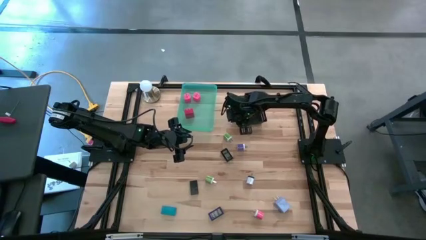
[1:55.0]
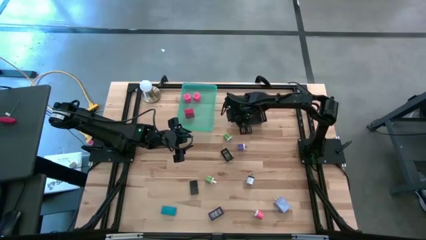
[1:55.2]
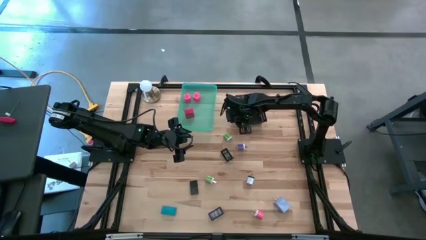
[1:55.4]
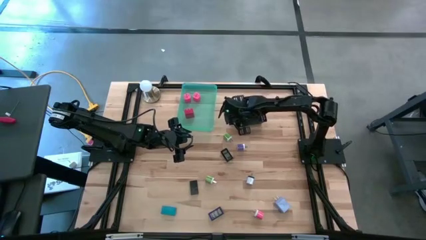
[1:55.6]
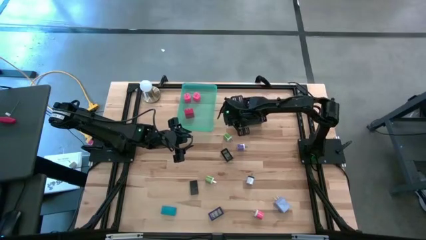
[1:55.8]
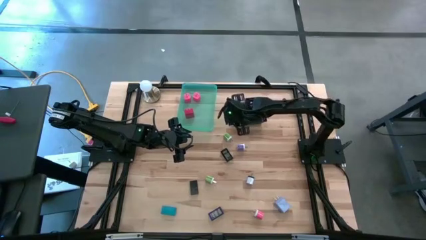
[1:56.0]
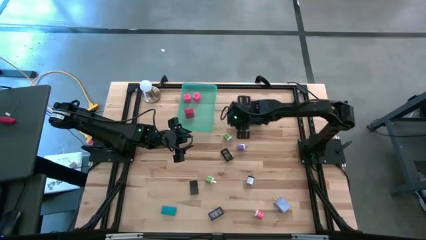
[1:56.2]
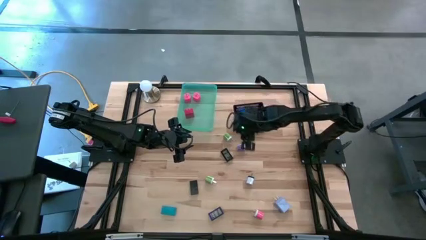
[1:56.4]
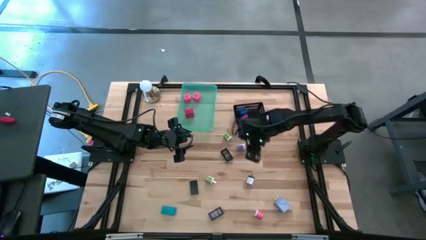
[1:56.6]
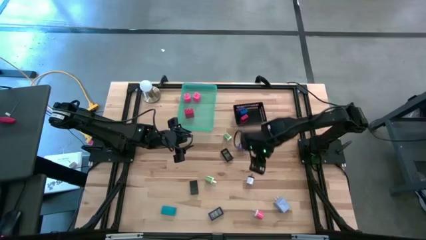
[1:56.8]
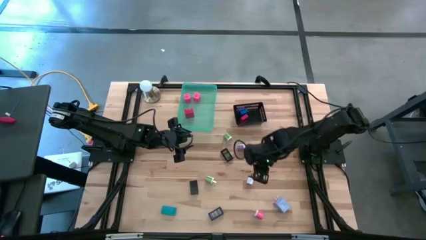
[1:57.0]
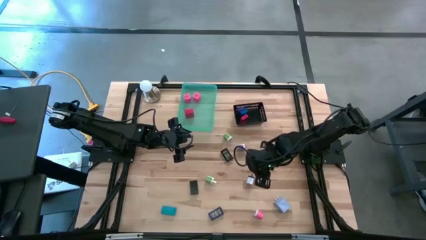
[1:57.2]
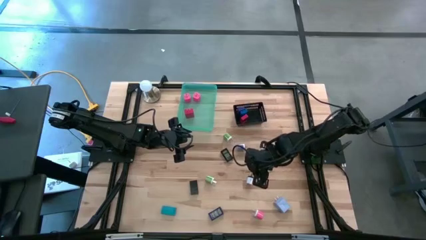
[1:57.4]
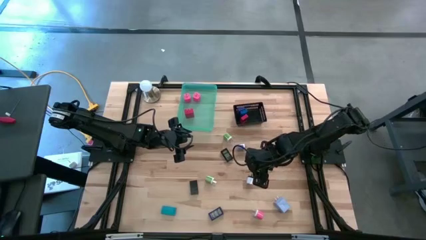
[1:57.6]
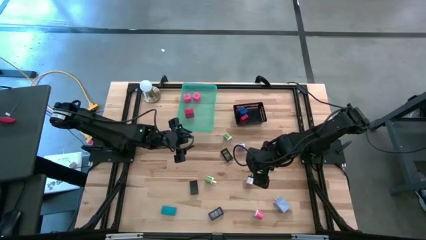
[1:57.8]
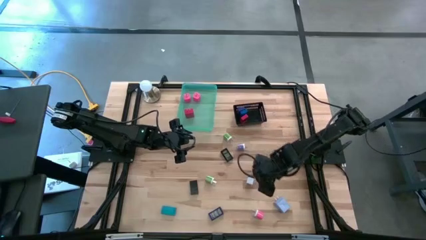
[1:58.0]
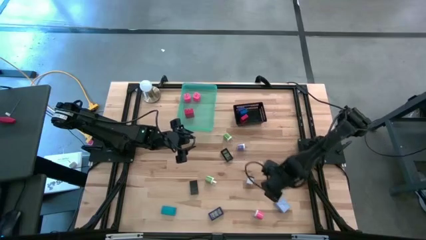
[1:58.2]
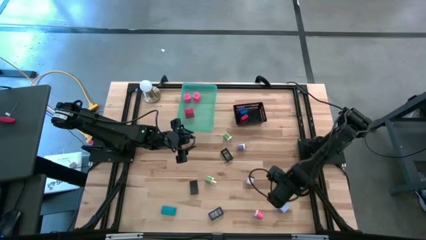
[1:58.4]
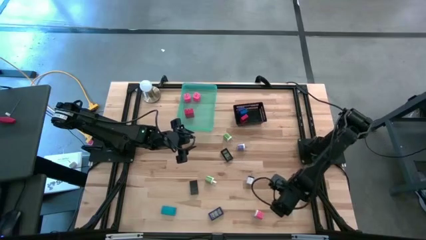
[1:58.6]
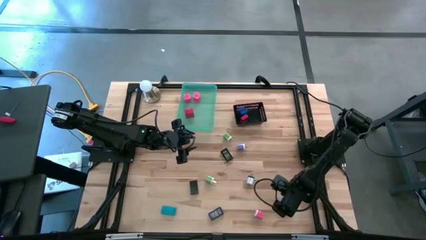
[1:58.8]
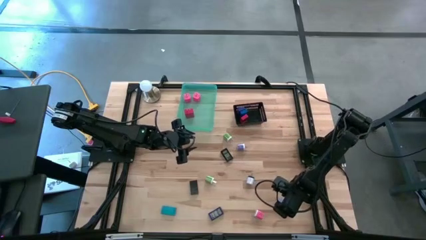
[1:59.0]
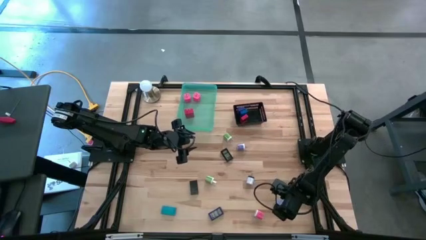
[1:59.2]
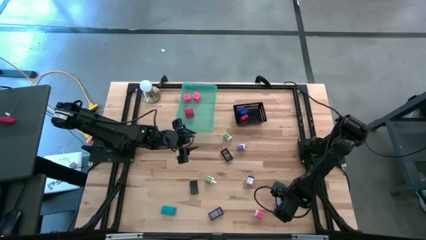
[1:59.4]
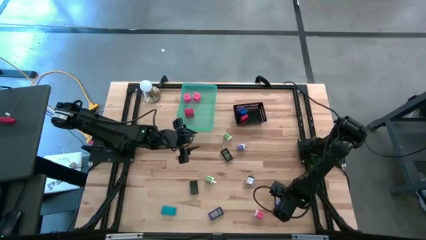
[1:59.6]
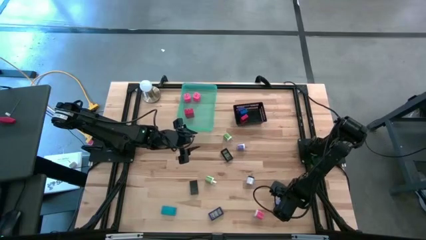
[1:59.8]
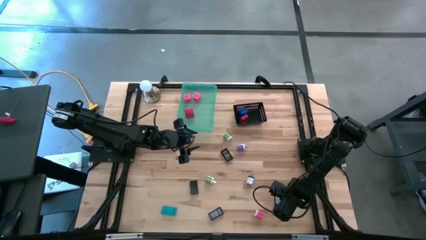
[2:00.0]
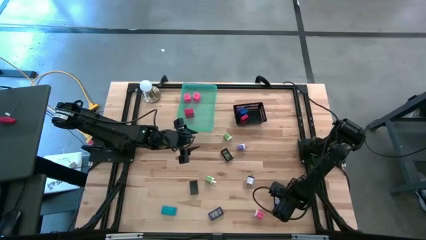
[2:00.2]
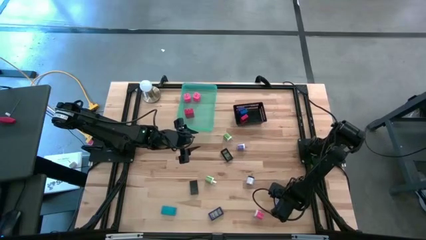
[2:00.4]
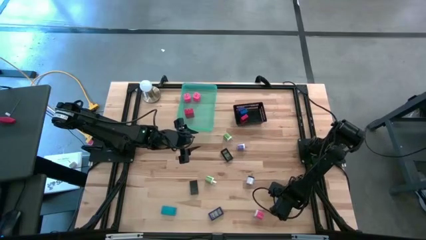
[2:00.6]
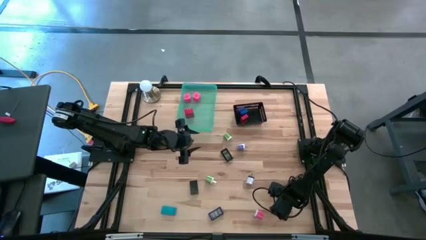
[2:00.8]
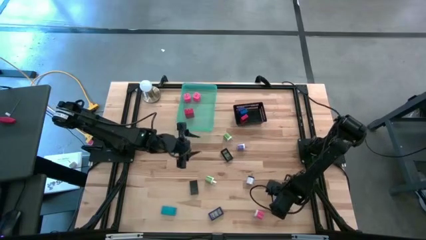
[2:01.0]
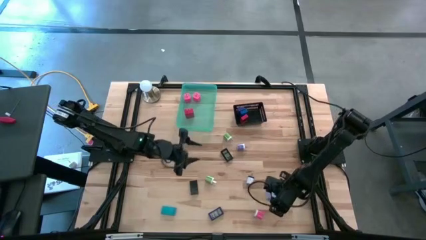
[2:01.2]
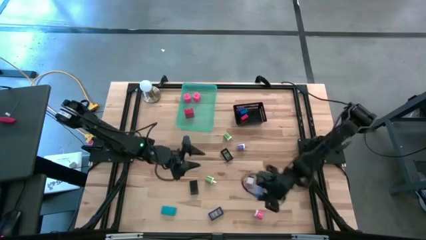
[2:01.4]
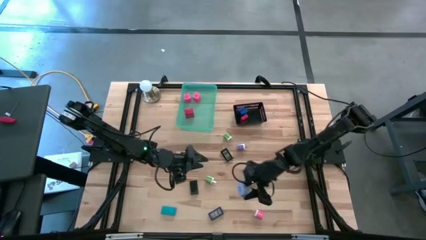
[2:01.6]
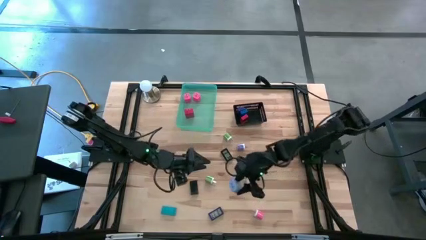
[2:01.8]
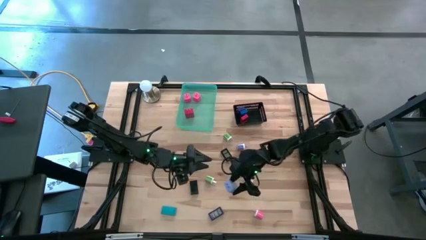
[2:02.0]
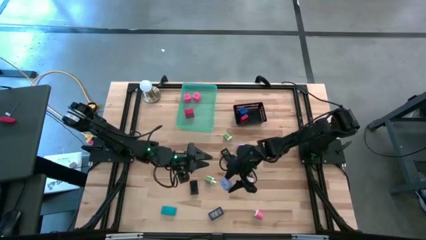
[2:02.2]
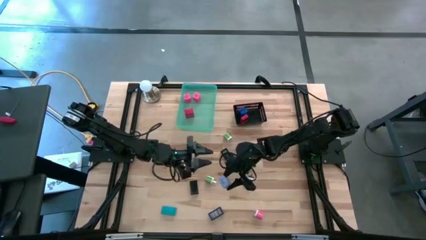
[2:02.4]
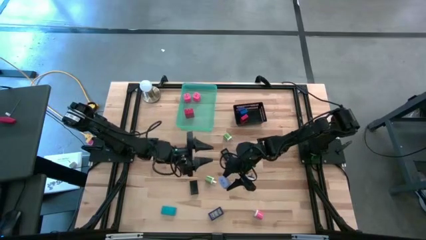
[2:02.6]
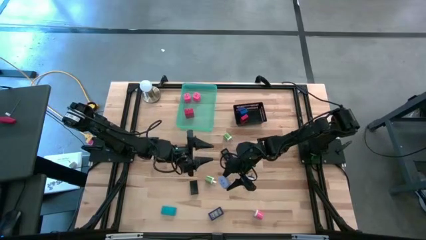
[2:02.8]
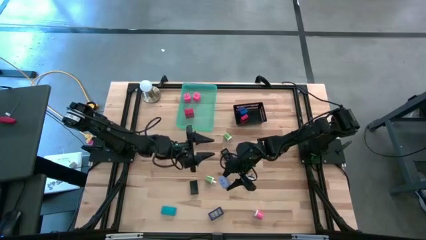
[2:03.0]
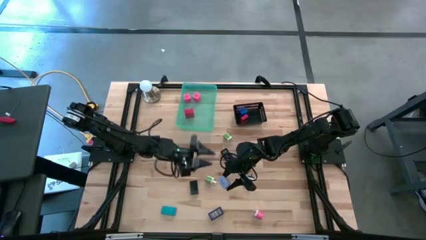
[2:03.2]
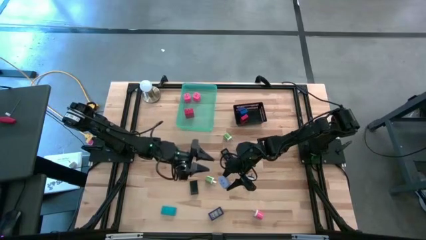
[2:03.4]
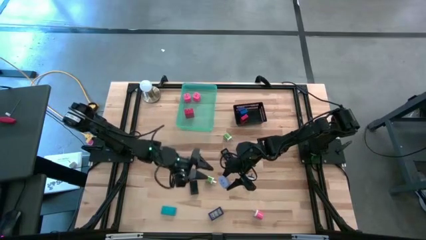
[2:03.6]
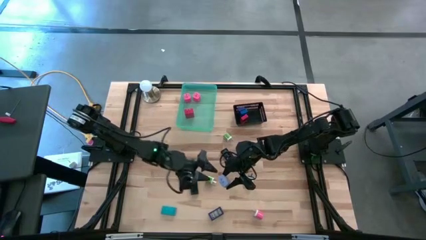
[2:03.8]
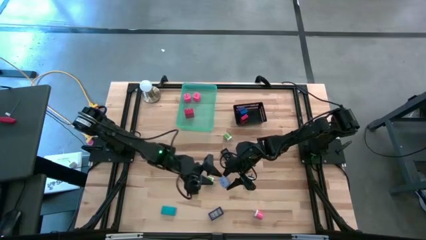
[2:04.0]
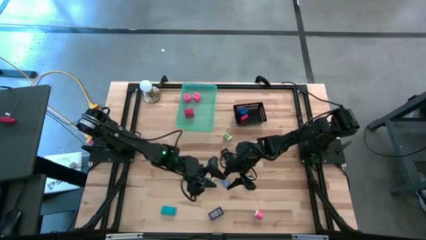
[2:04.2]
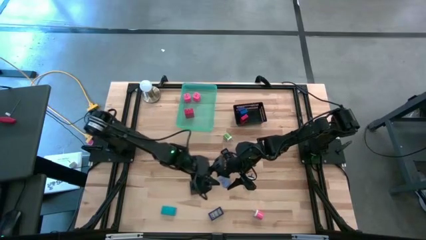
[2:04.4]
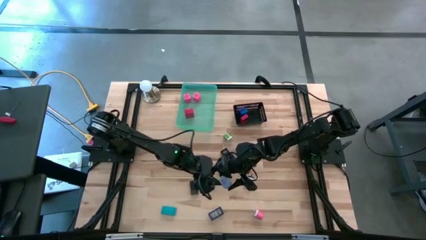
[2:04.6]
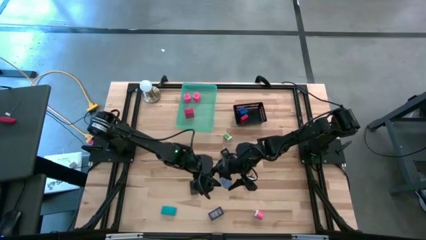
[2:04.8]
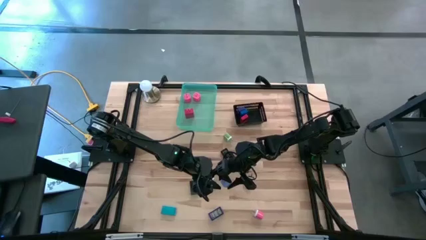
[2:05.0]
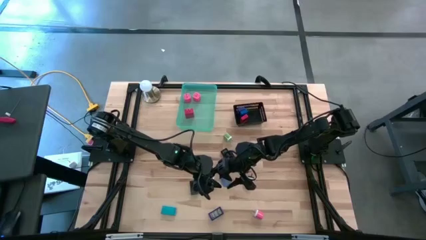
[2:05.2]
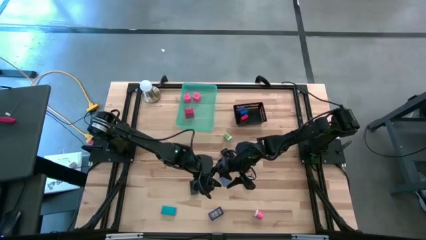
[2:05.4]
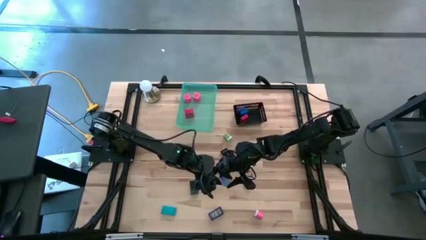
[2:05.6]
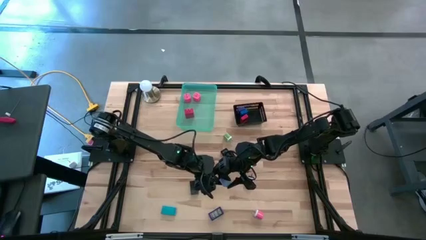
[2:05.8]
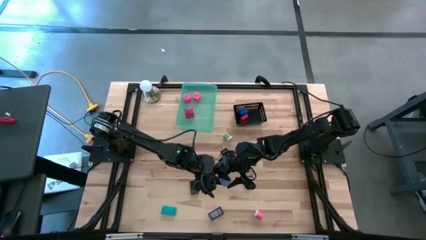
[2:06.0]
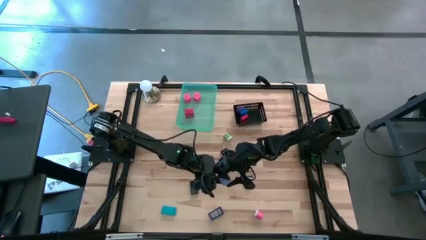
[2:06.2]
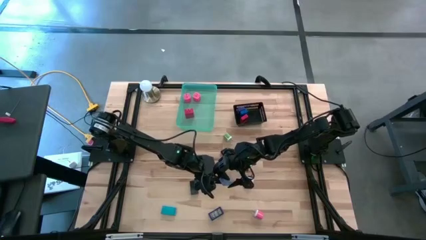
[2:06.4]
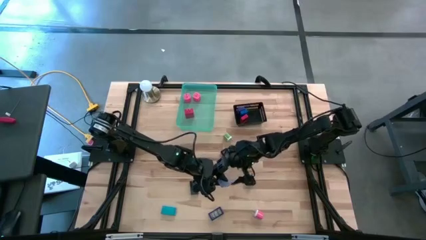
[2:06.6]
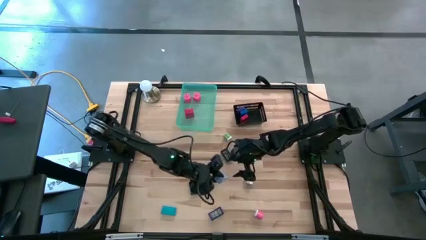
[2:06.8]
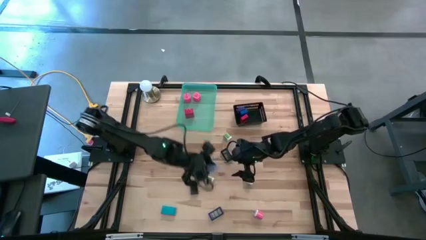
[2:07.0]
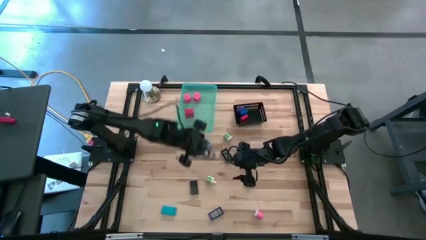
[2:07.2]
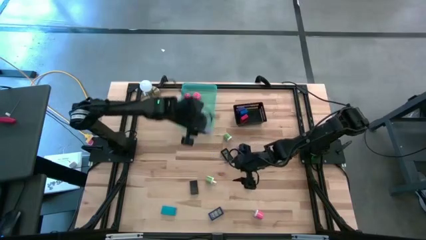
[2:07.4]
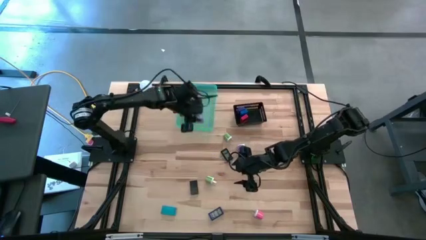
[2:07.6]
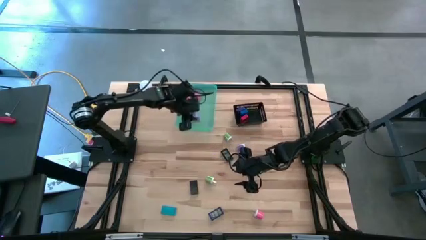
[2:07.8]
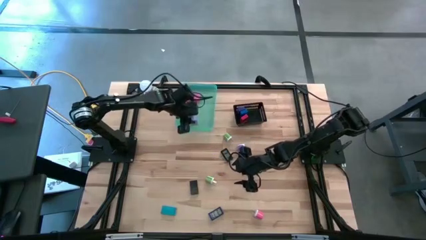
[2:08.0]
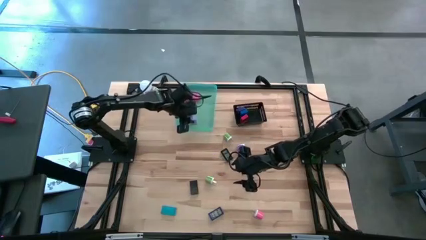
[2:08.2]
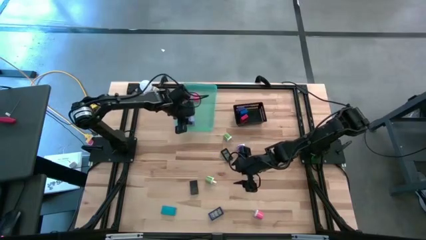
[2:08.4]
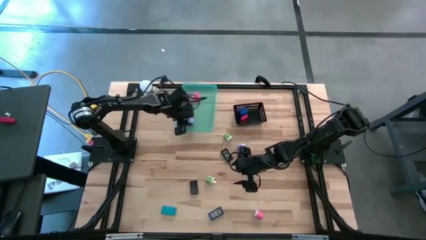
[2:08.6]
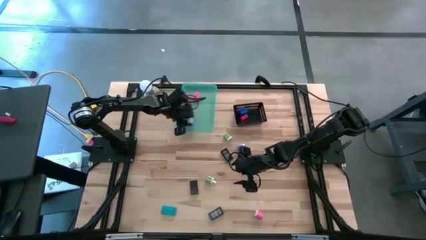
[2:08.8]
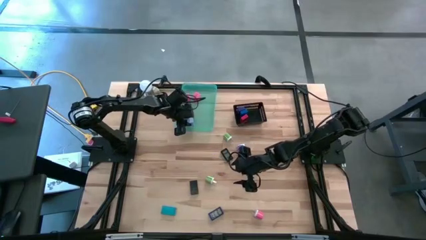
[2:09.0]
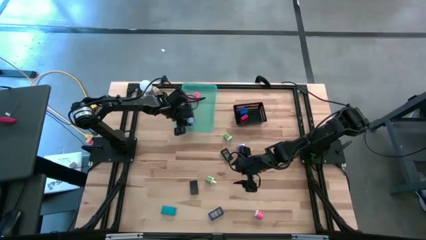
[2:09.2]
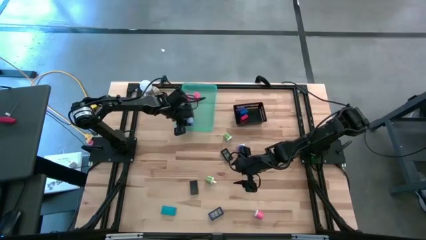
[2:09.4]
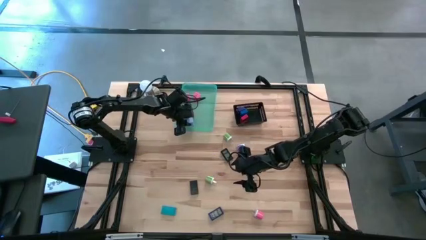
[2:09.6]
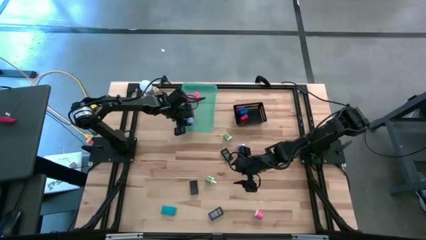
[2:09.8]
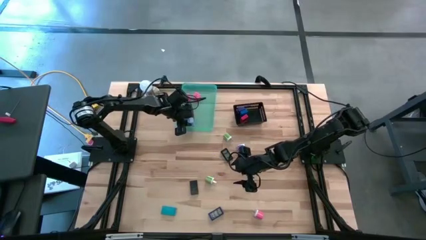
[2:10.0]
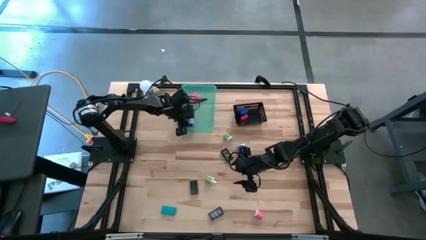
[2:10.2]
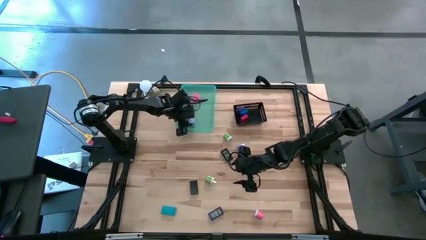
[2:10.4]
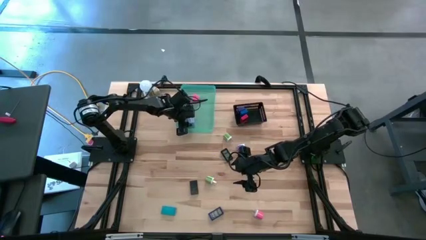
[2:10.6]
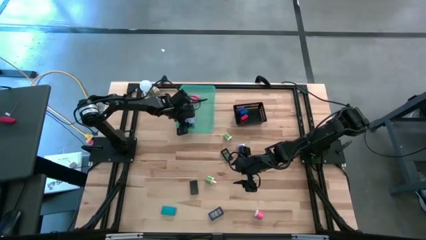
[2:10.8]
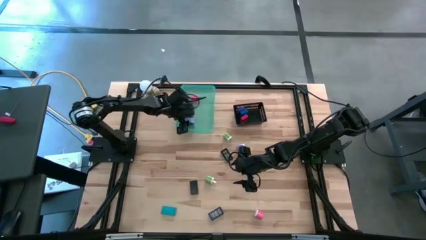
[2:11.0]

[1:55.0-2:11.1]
Task: Pick & Place Office items
Put the light purple charger adapter into the green bin
